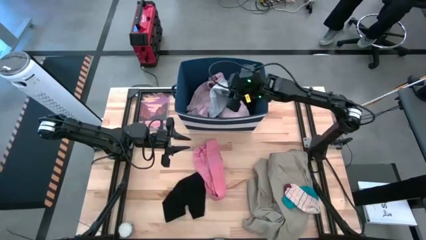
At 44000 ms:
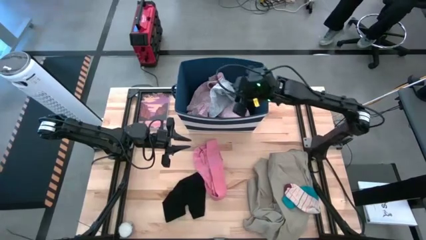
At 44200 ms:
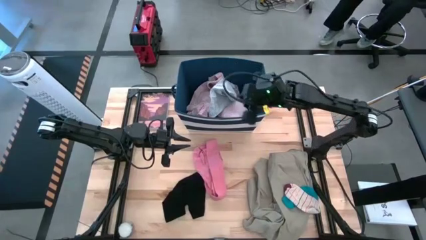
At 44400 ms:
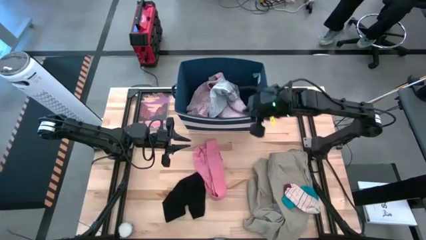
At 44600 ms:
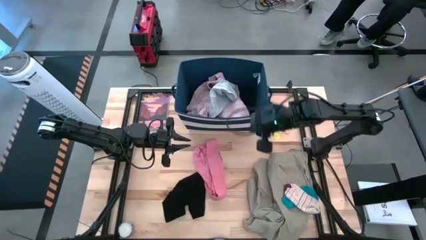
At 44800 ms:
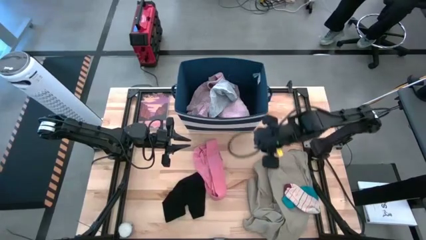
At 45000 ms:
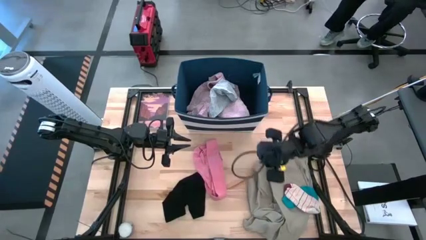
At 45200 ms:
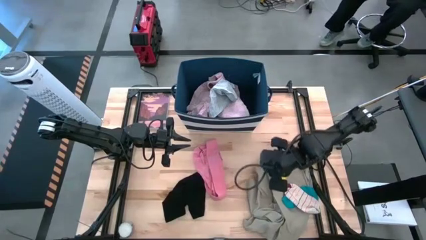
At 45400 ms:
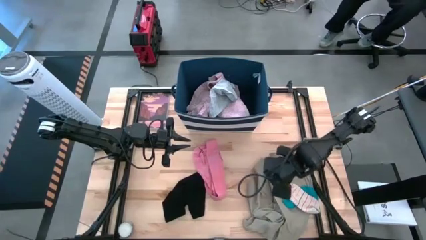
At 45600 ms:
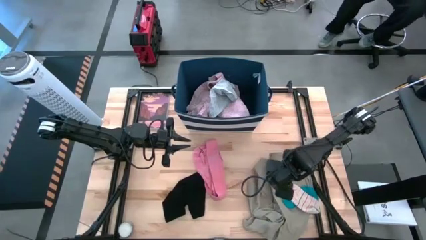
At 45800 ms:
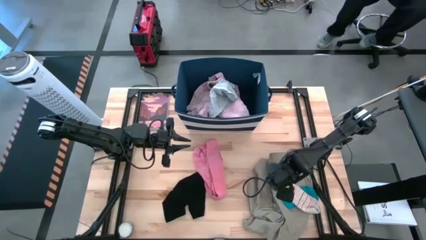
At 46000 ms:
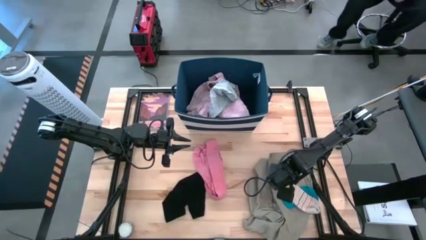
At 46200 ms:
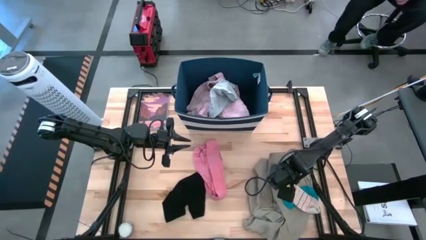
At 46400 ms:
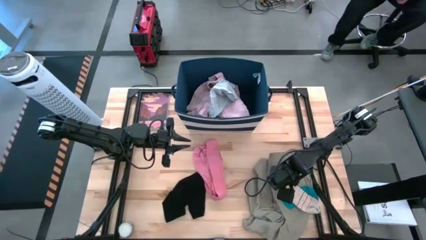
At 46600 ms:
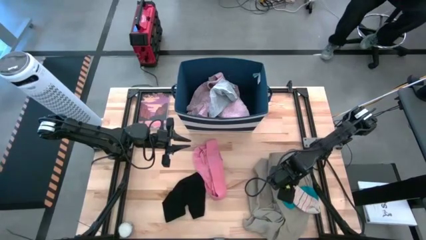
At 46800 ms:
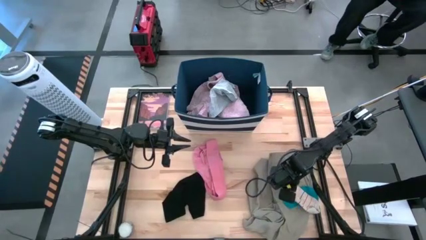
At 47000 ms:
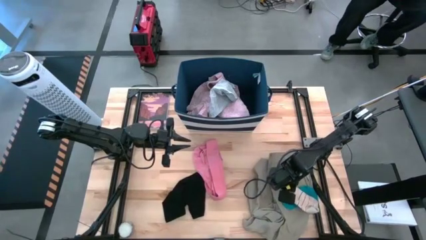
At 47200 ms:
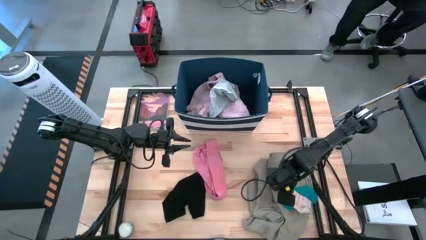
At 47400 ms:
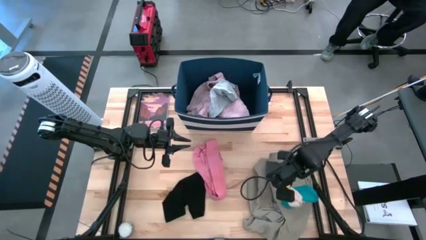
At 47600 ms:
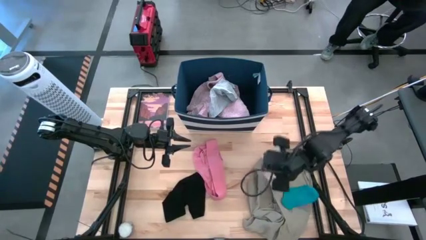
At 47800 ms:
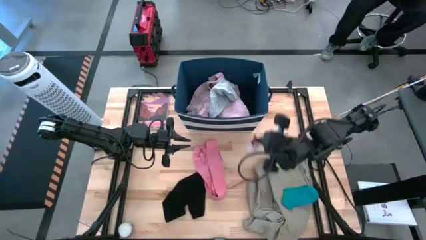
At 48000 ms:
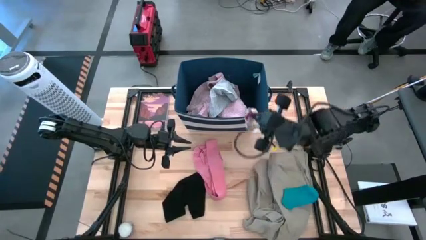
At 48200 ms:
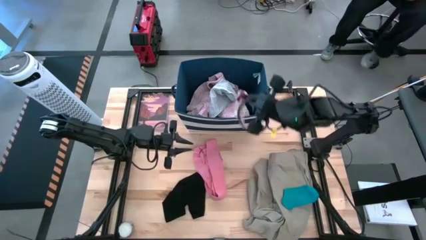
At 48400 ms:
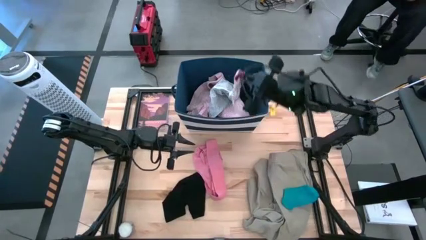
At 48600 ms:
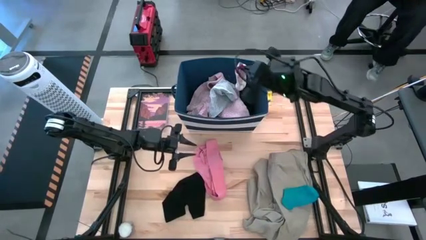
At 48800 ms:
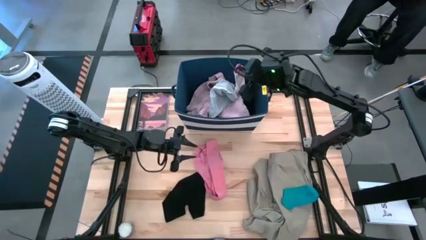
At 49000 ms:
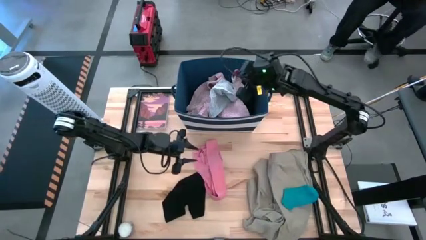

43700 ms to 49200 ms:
Task: Sort clothes
Put the light pink striped sock into the blue bin

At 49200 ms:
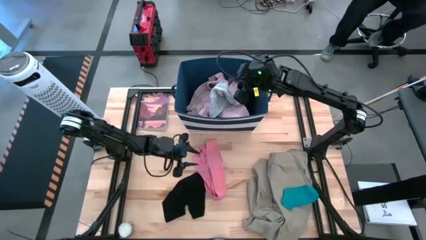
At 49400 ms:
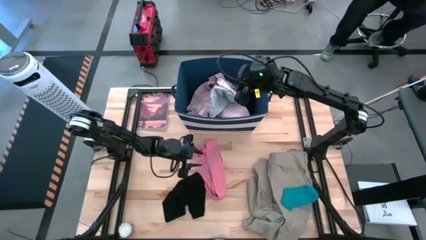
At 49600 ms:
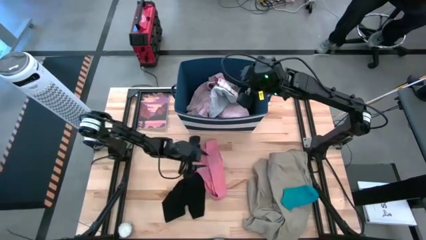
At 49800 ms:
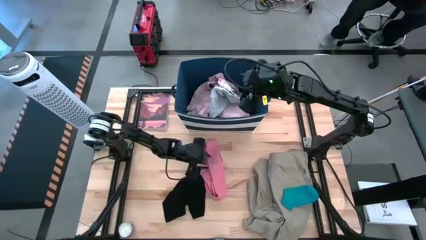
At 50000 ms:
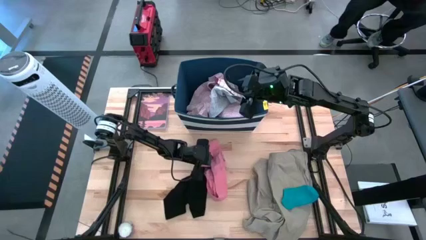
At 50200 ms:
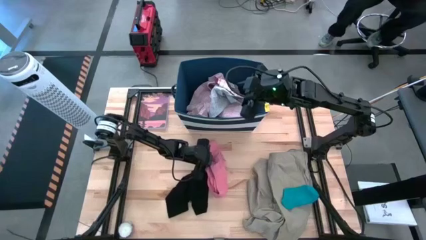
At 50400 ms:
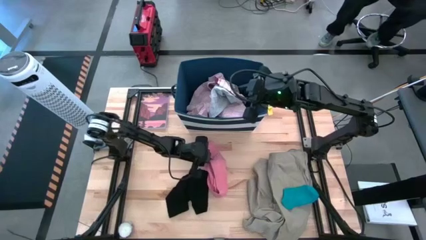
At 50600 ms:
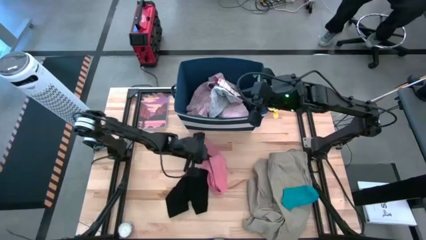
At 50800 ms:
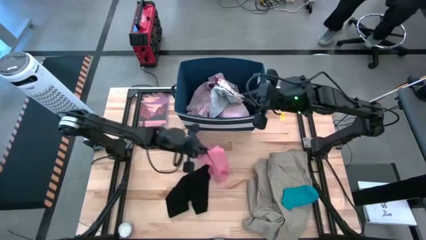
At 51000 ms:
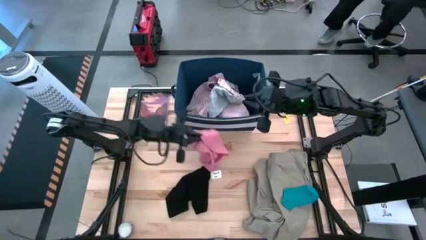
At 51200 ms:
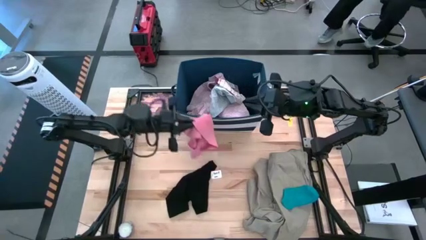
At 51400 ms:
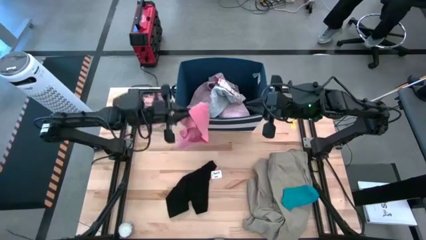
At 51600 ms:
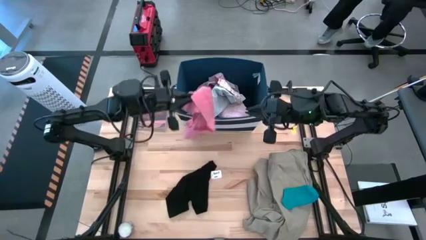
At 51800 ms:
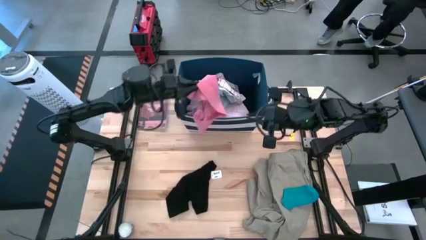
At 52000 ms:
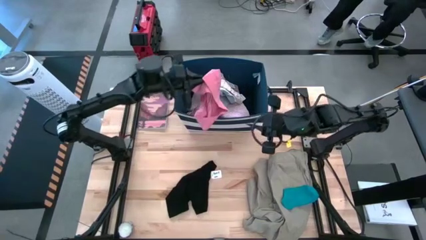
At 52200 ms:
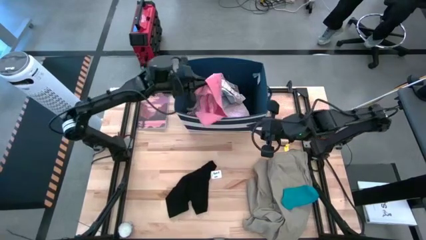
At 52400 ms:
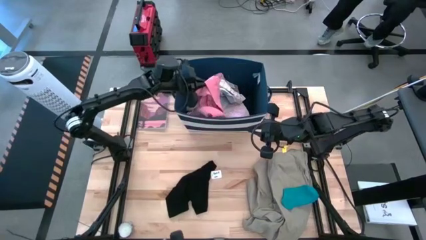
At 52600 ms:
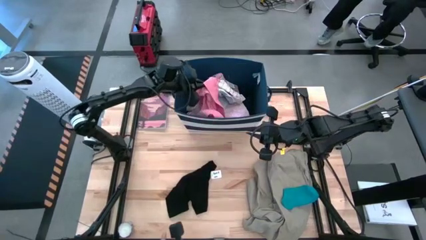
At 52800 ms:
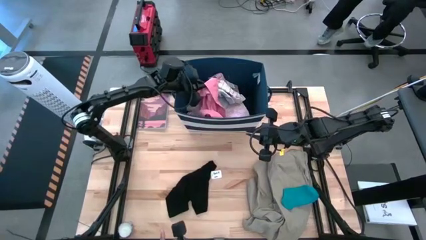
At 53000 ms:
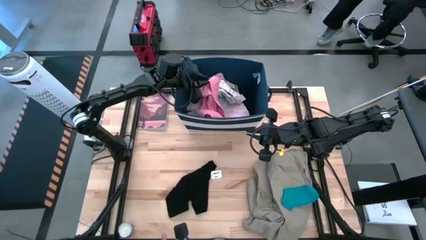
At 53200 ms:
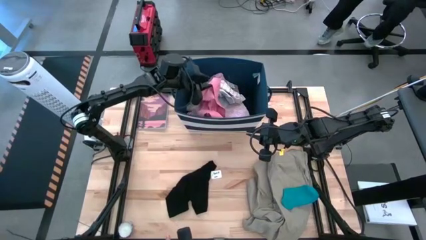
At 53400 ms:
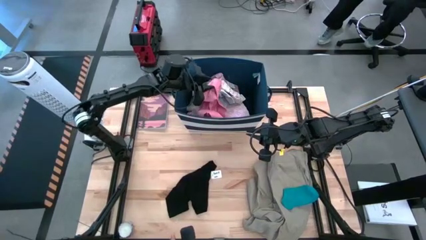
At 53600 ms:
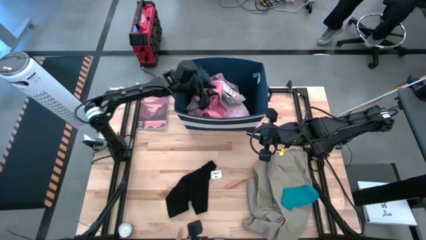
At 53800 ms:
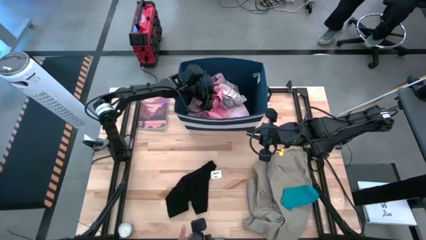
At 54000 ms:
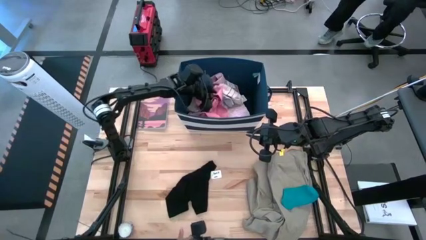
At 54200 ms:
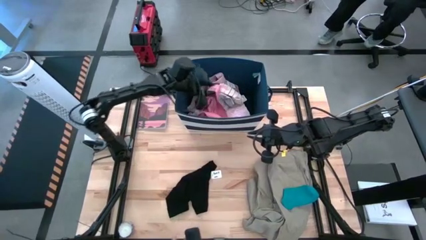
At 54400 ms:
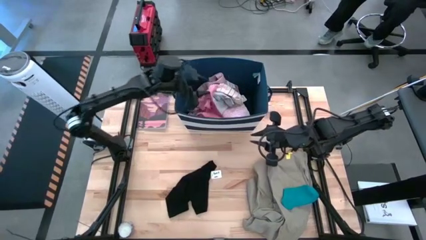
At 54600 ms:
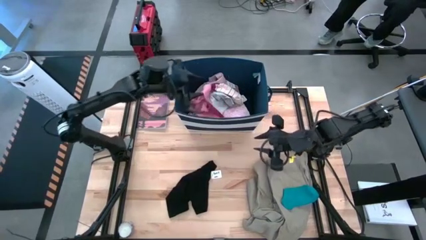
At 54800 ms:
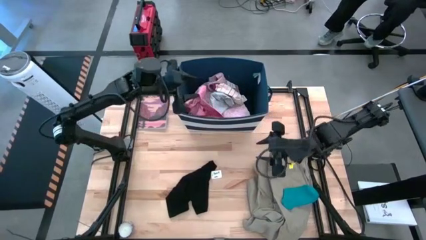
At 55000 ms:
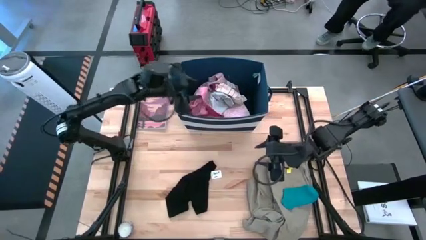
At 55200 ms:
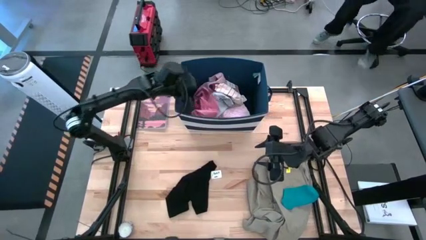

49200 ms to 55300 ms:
Put the pink underwear into the blue bin

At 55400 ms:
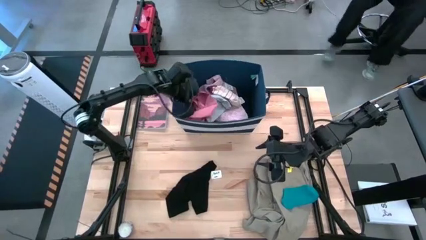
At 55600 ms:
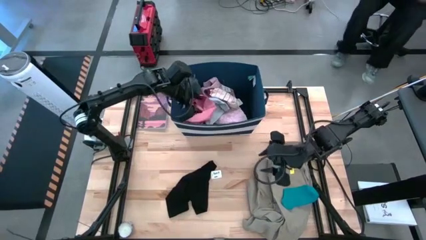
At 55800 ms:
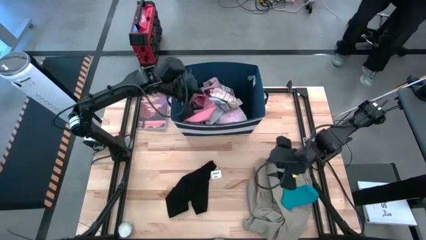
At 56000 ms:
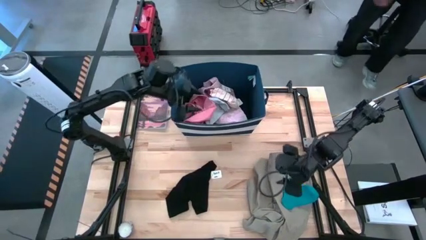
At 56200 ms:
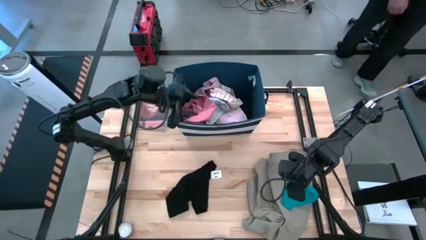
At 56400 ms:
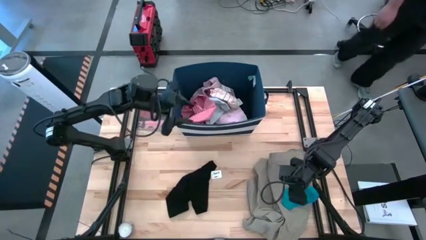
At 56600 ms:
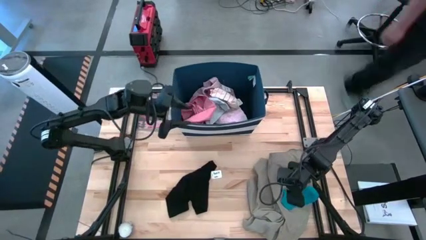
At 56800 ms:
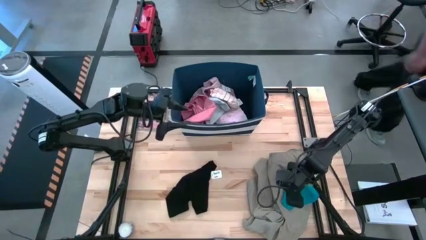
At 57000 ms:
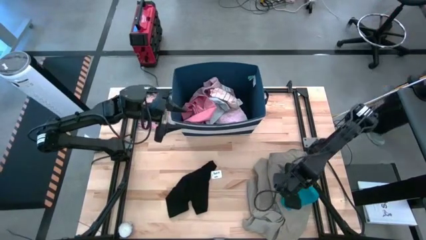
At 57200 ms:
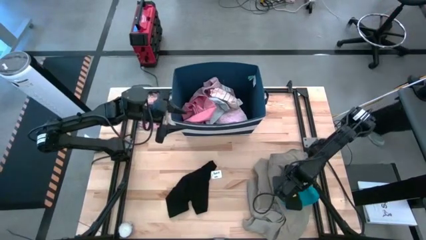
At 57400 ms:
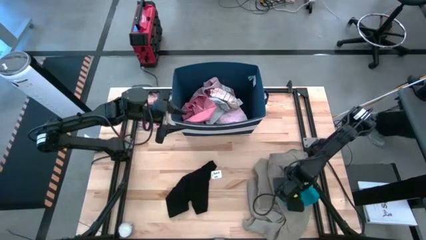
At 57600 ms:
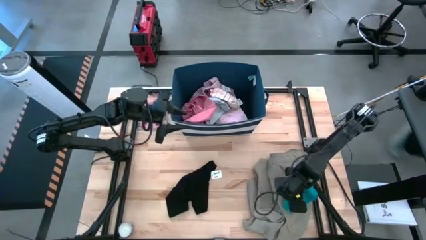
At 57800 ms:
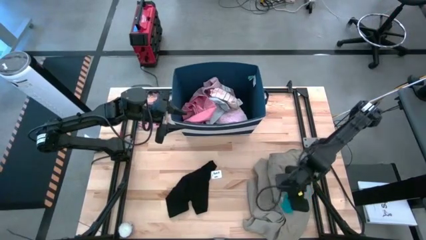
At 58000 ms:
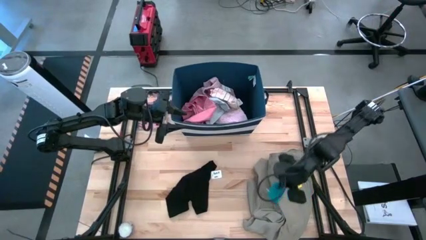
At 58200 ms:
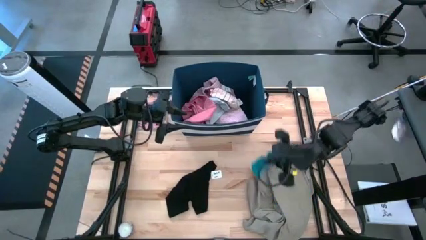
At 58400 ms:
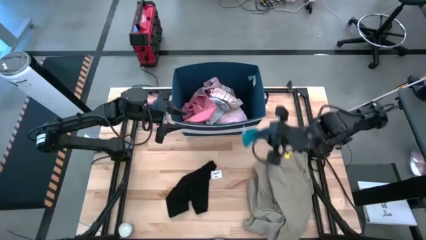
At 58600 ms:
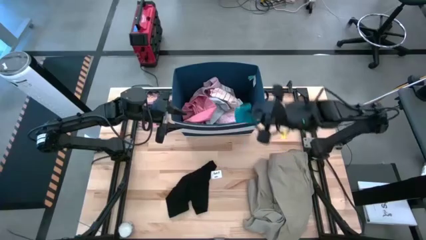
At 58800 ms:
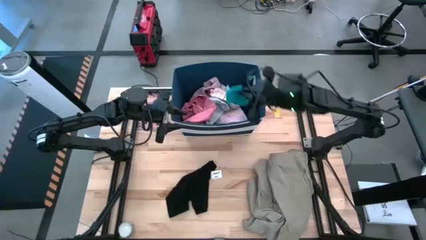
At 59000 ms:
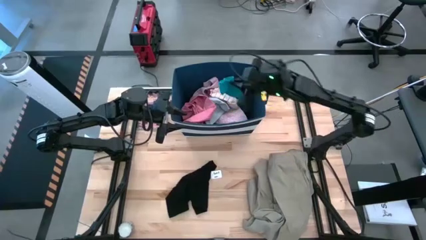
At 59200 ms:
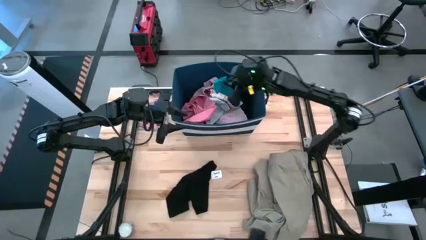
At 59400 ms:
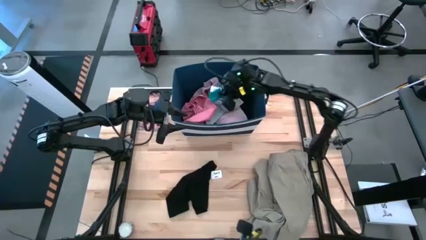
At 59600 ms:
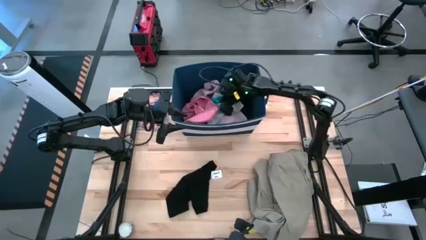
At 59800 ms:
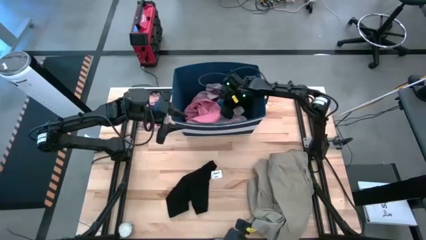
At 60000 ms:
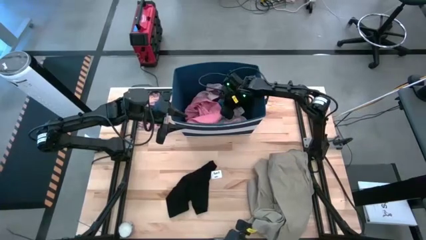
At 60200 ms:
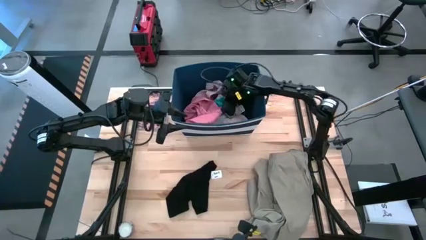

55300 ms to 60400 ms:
Put the blue sock into the blue bin
